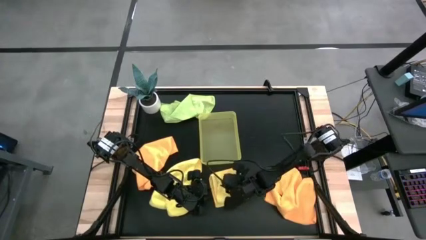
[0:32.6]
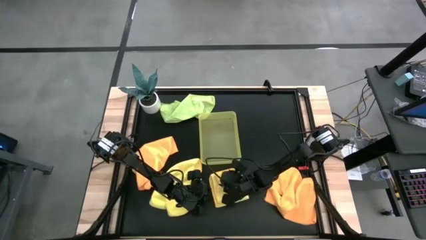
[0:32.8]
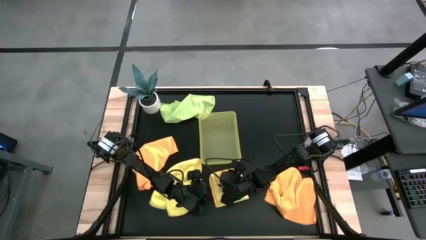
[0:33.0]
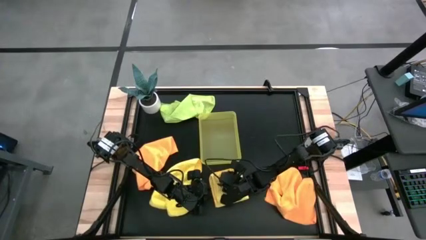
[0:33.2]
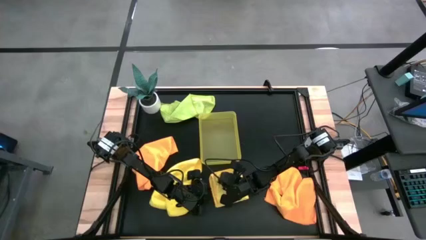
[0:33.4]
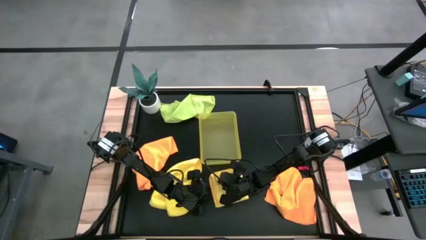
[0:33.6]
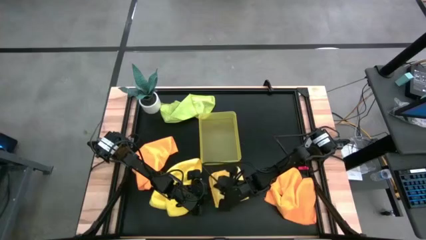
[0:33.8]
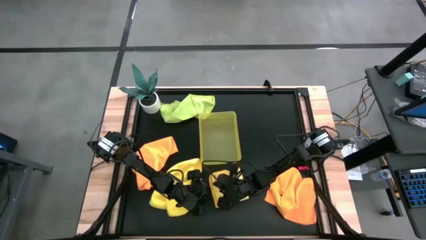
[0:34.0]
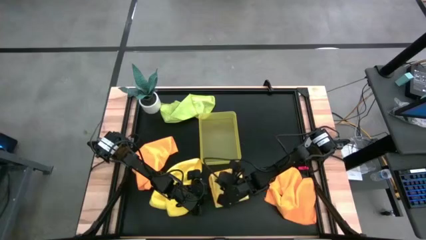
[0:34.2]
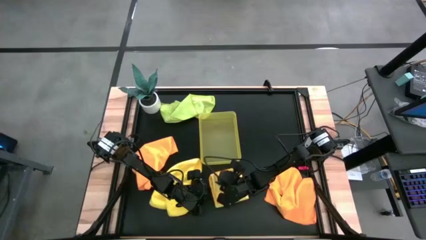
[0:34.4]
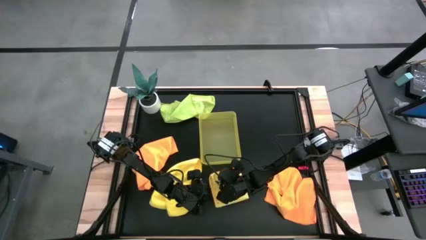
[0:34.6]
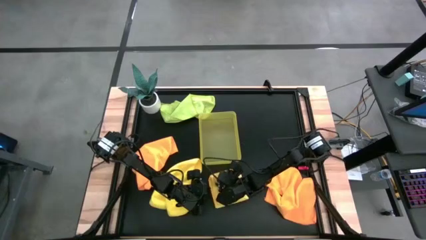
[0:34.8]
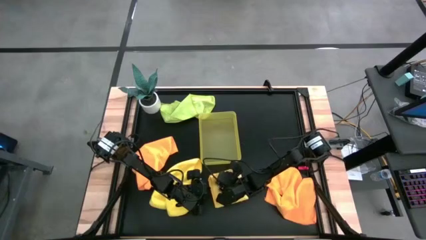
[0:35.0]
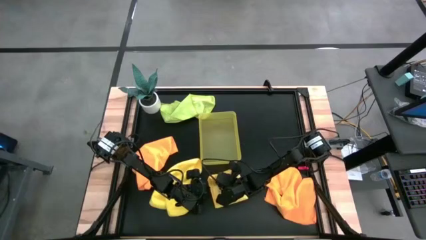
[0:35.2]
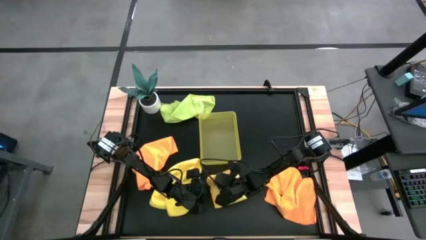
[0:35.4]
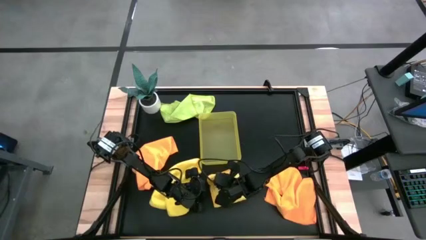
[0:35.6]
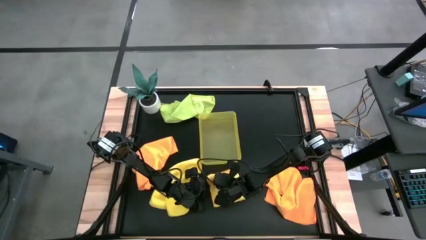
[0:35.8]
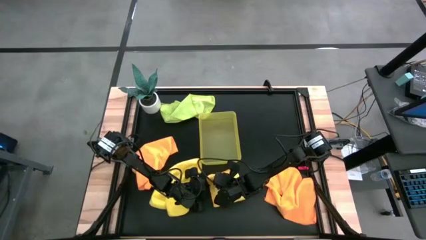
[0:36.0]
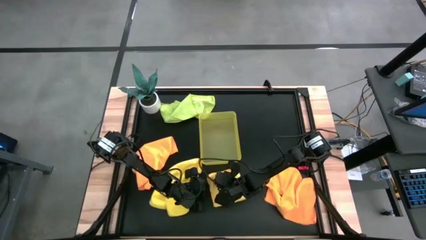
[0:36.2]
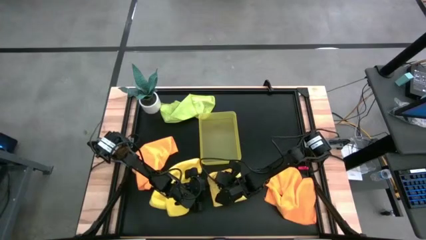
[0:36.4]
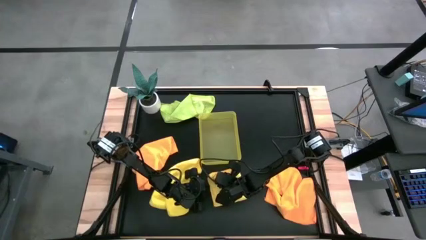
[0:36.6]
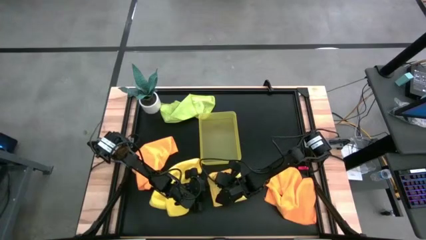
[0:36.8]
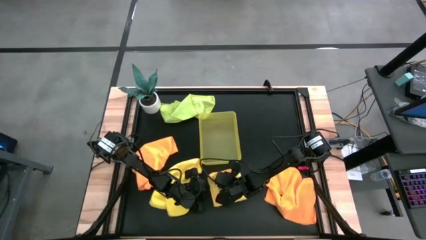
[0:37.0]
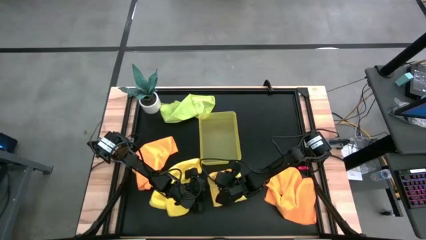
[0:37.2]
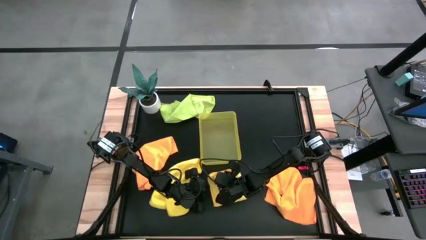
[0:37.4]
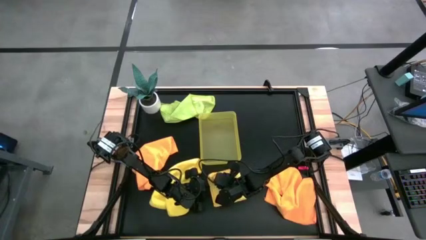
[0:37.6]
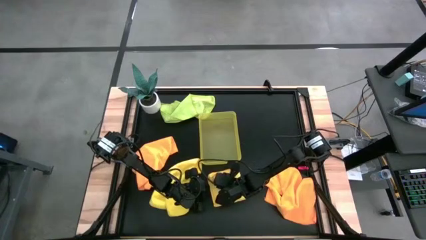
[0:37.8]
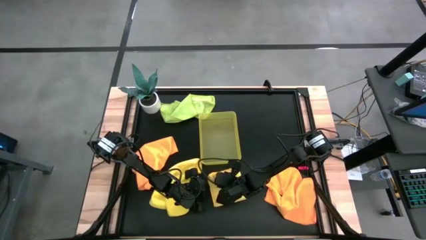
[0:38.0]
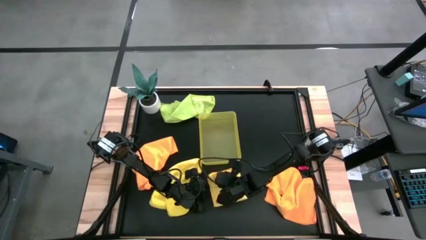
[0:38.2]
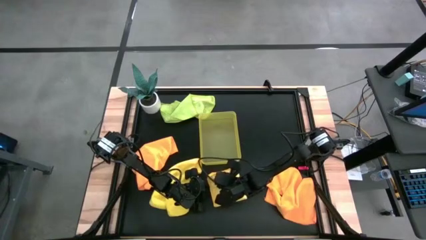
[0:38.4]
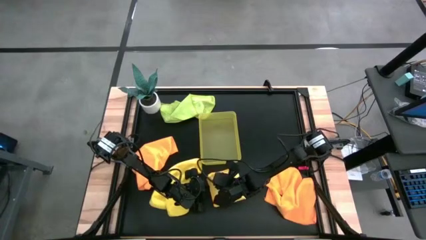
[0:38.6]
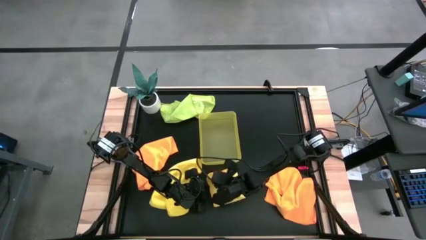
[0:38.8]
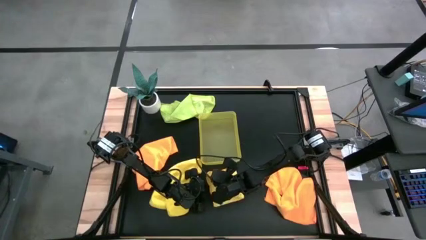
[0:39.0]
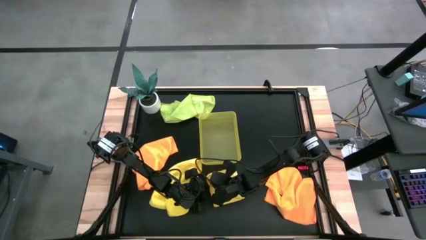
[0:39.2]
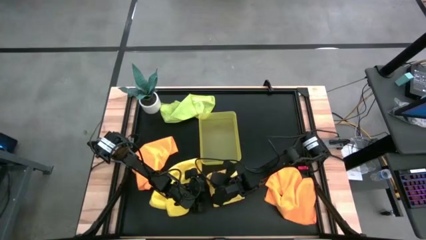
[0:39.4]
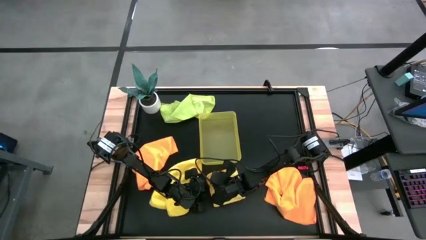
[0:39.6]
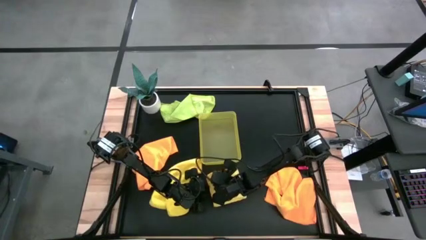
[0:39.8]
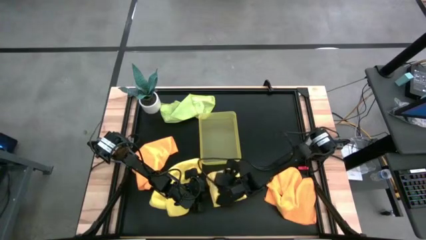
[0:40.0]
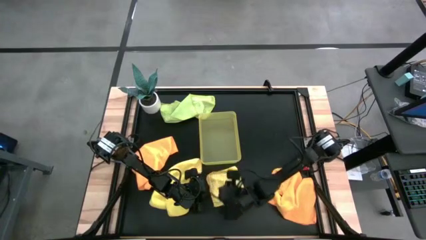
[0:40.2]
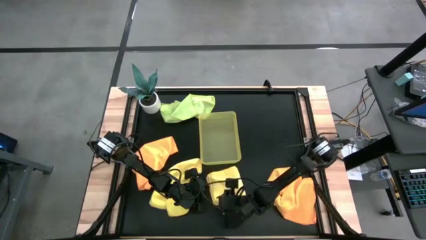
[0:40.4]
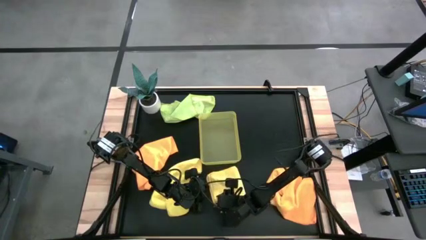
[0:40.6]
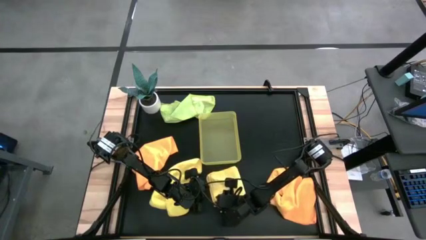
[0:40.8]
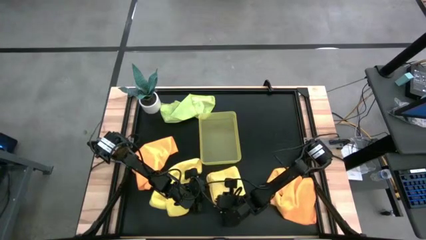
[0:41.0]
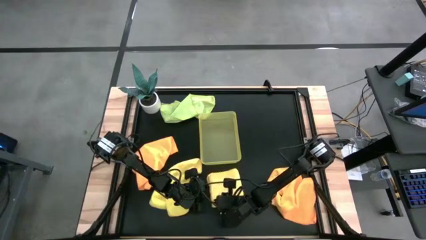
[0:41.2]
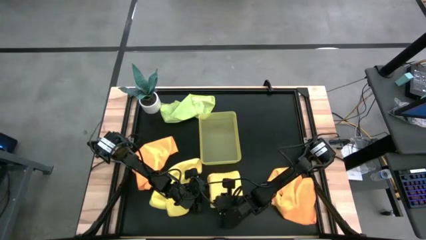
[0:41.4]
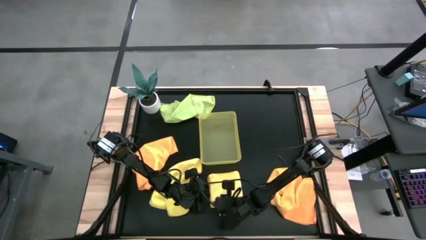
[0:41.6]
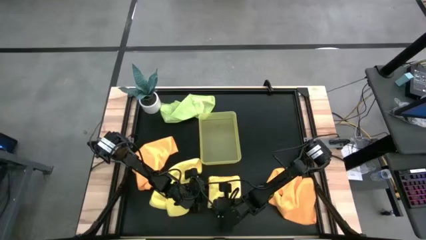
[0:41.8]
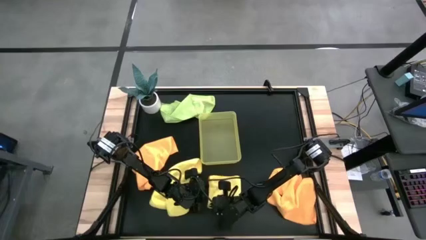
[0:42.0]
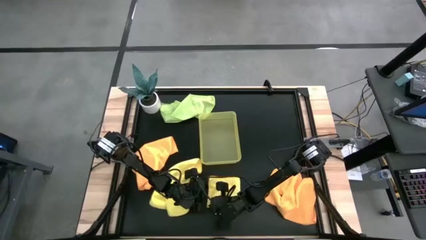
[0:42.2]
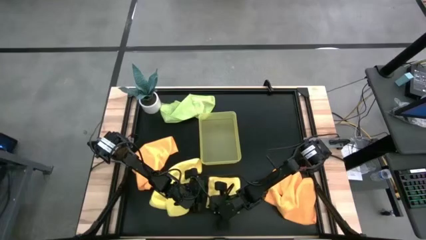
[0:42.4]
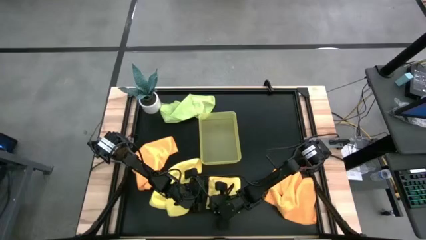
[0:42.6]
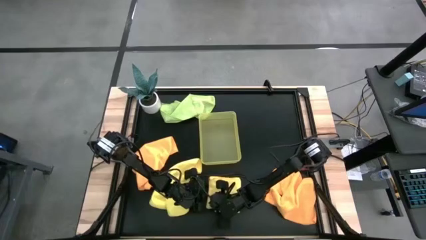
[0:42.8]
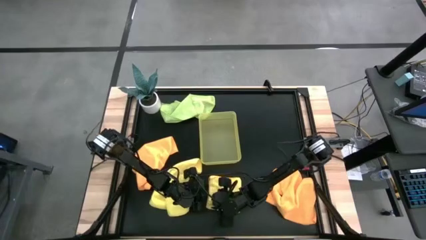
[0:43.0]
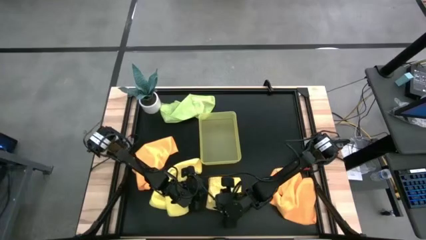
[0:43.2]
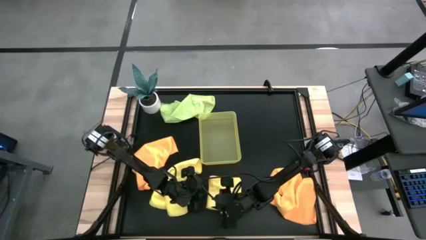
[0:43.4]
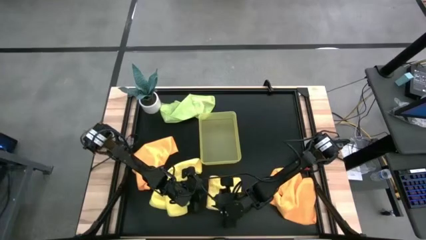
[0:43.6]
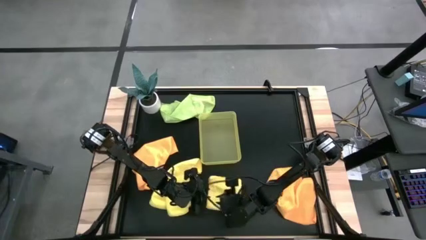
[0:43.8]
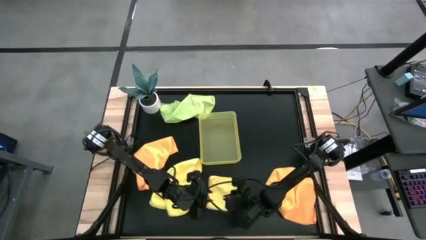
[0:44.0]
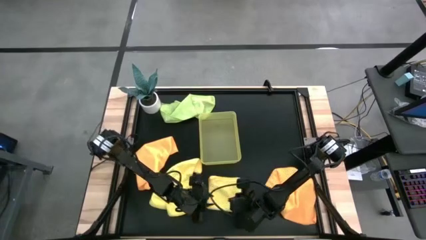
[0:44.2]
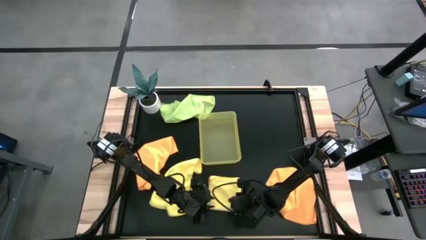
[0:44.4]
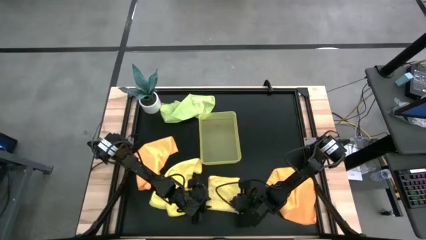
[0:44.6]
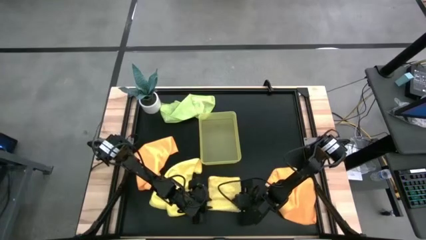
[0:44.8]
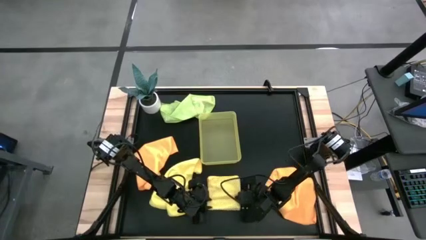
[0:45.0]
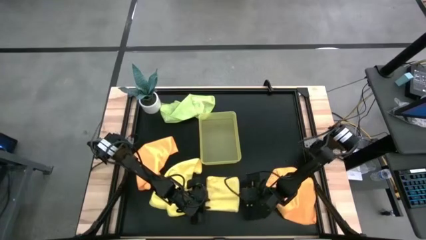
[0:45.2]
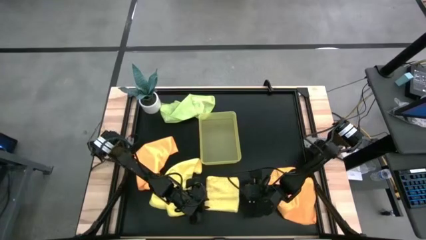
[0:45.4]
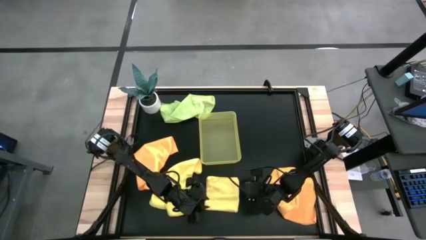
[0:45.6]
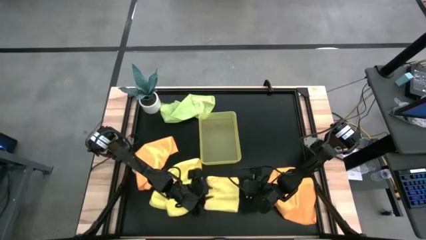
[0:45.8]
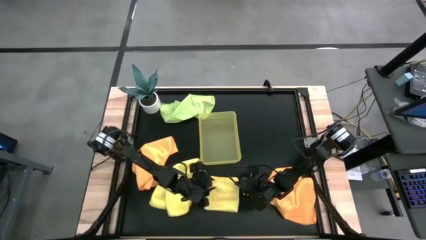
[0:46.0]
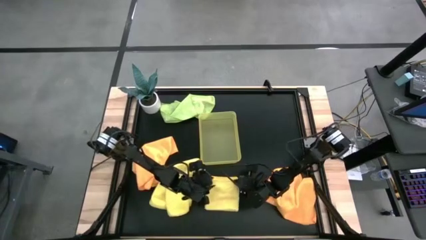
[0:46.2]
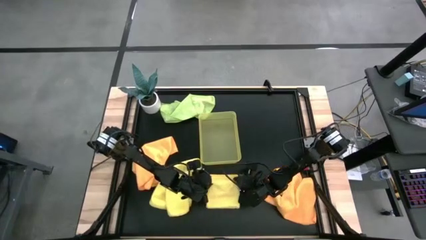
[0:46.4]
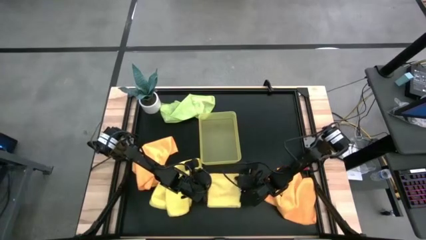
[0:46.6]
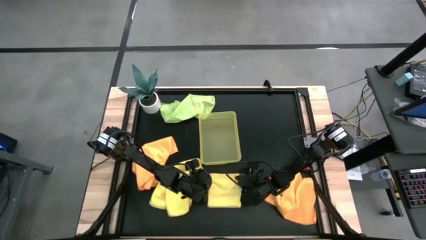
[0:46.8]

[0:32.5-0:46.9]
Task: Fold microfiber towels
Fold the top yellow microfiber cloth

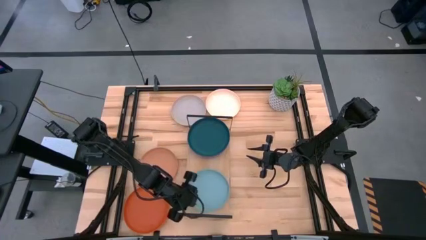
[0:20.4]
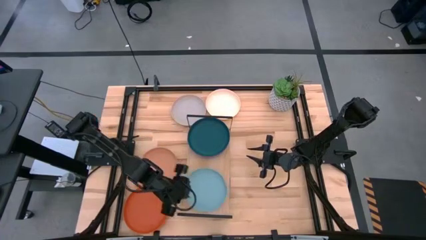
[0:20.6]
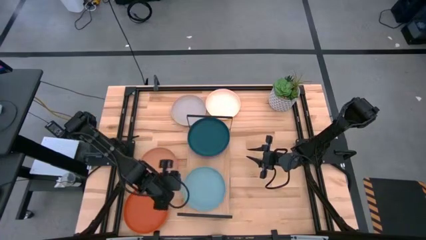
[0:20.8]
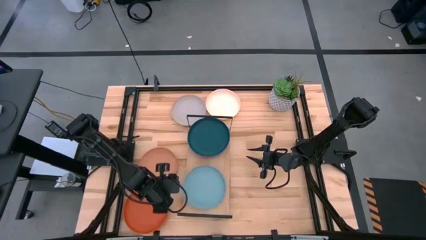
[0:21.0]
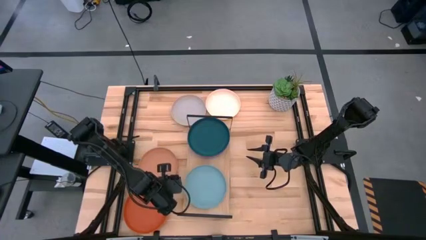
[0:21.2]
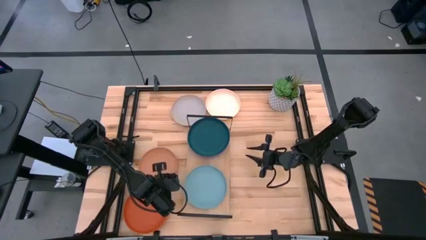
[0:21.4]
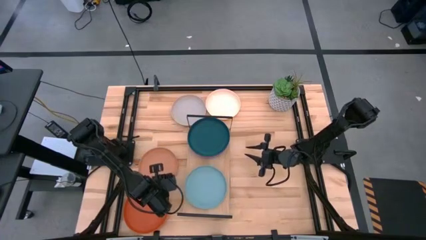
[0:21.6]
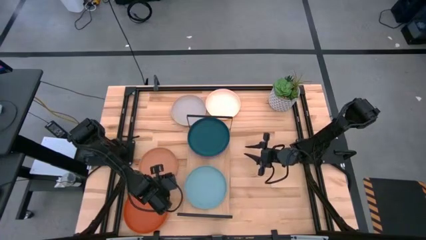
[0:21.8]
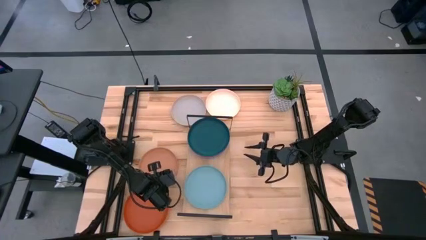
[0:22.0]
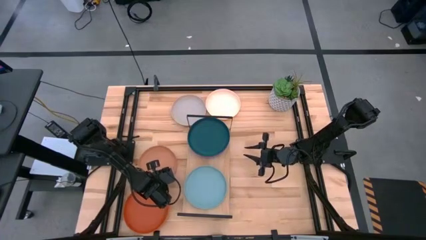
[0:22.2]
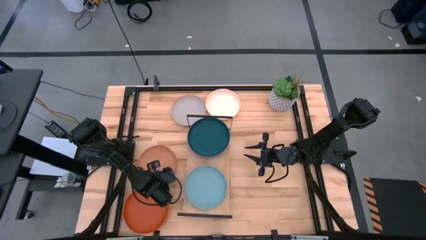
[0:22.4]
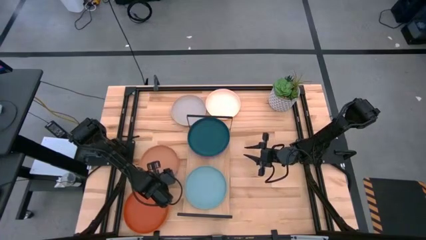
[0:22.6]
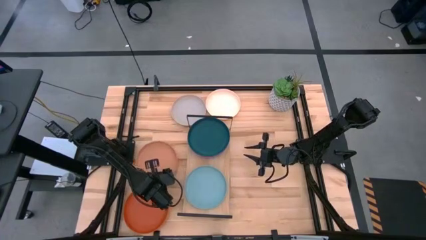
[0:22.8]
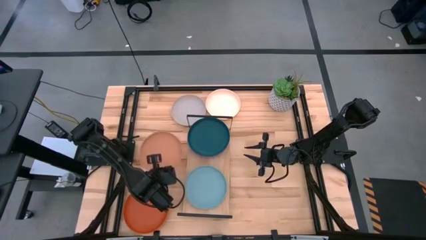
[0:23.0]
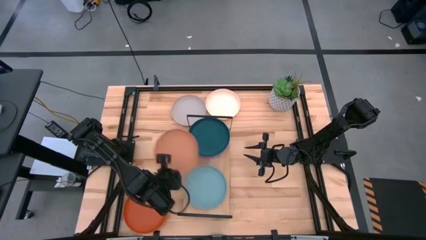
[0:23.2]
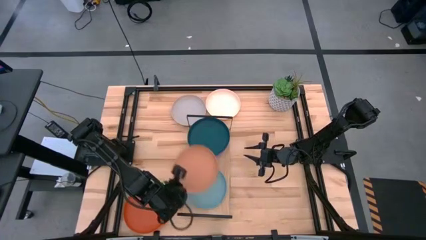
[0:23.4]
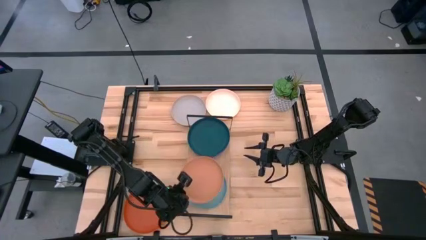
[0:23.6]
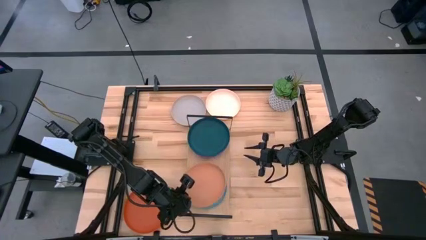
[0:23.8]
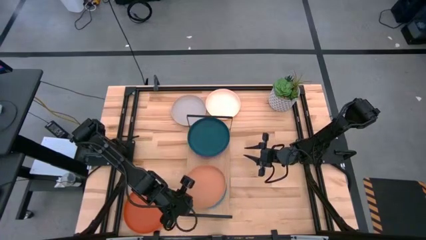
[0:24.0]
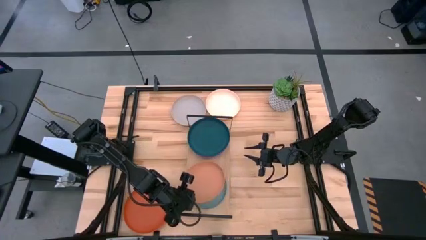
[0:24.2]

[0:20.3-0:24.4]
Task: Place and stack plates onto a shelf
Stack the brown plate on top of the light blue plate on the shelf
